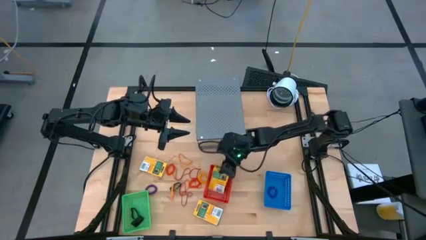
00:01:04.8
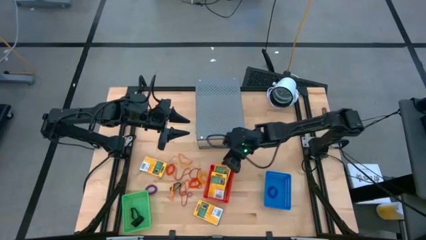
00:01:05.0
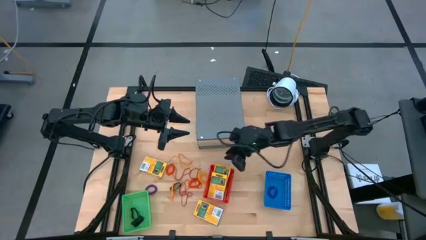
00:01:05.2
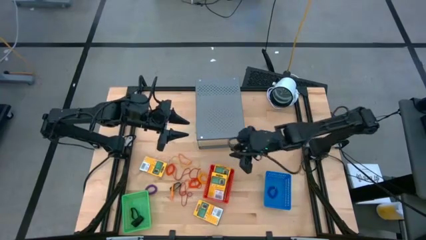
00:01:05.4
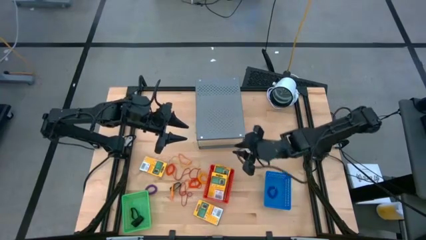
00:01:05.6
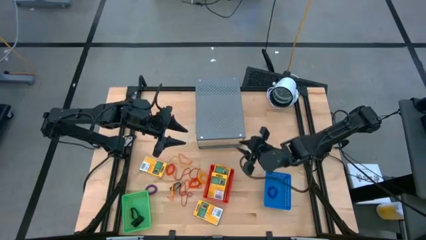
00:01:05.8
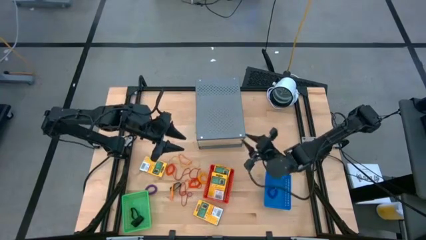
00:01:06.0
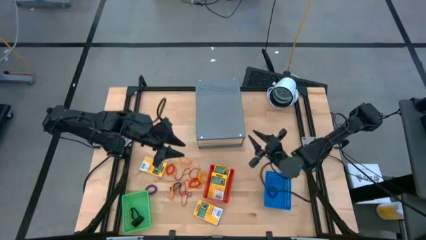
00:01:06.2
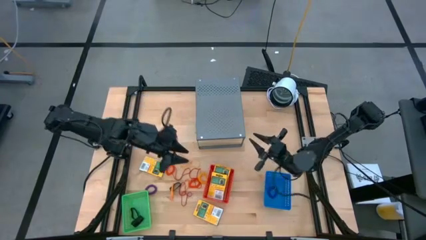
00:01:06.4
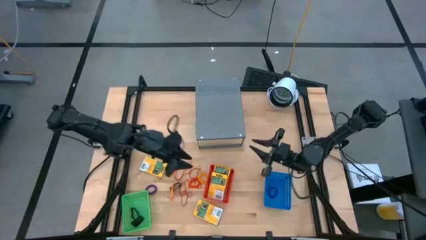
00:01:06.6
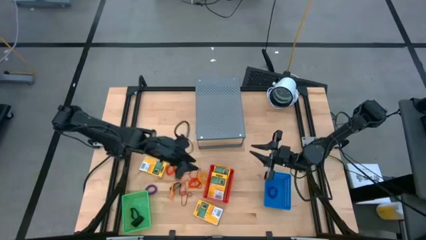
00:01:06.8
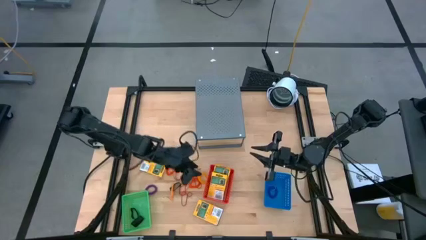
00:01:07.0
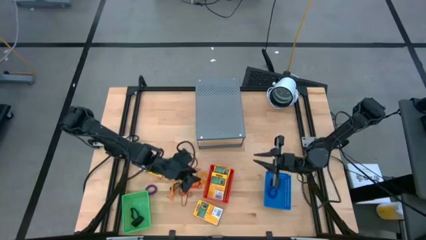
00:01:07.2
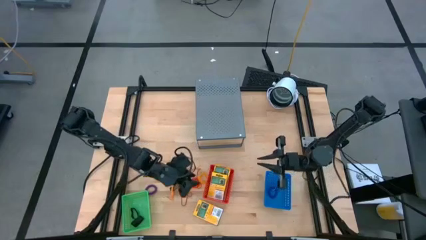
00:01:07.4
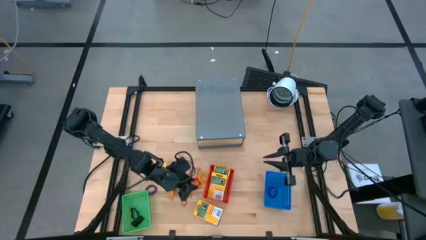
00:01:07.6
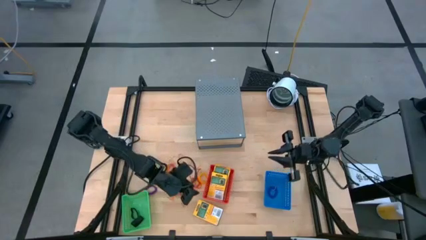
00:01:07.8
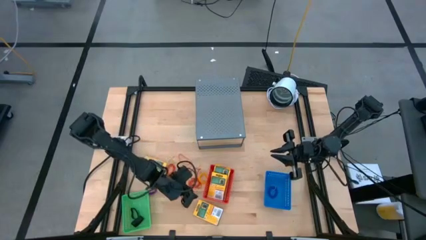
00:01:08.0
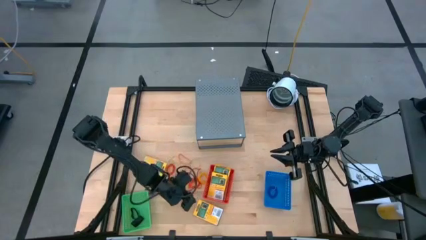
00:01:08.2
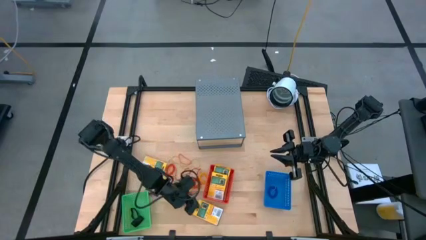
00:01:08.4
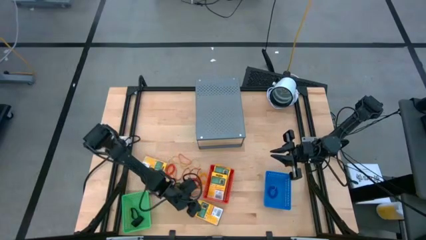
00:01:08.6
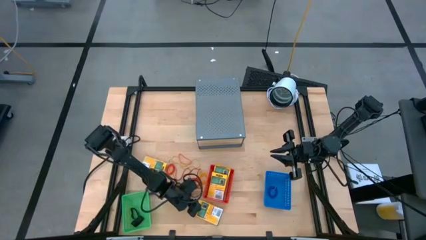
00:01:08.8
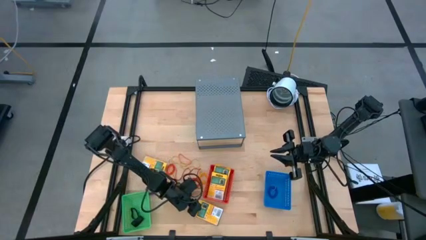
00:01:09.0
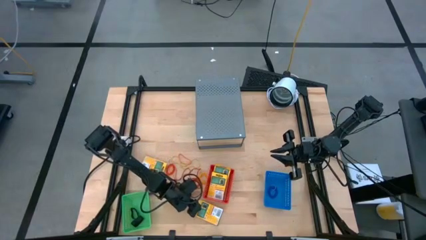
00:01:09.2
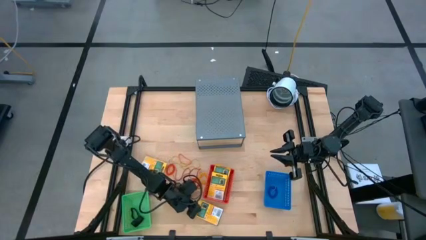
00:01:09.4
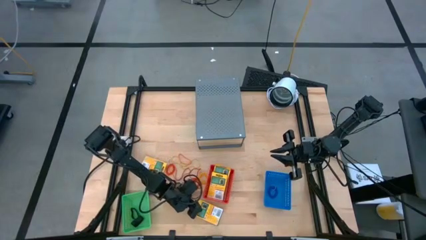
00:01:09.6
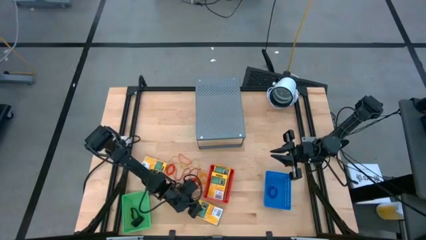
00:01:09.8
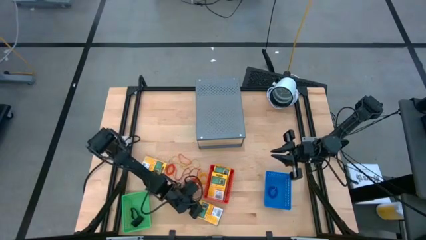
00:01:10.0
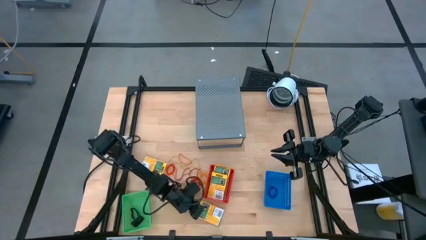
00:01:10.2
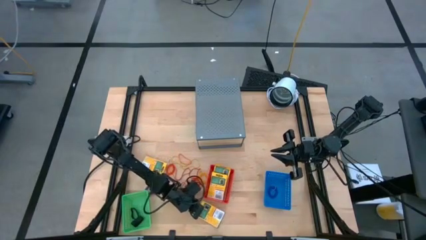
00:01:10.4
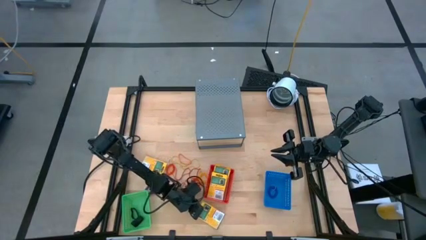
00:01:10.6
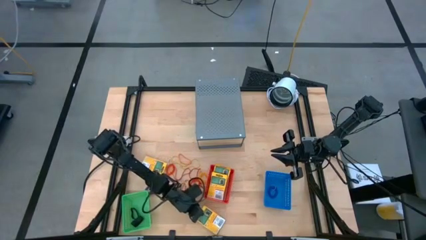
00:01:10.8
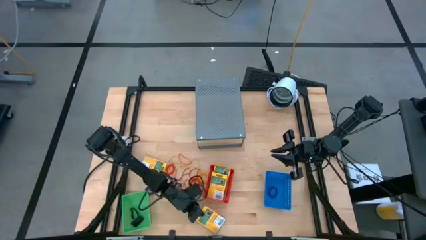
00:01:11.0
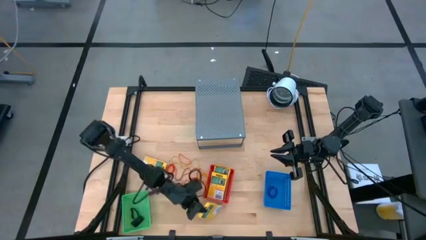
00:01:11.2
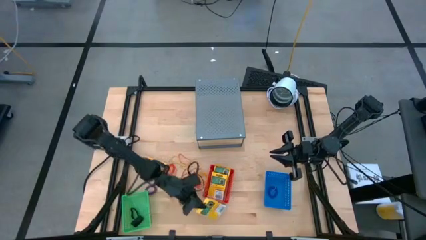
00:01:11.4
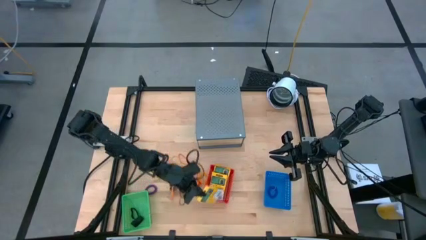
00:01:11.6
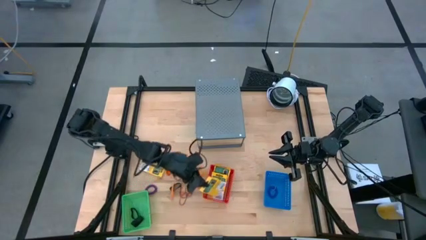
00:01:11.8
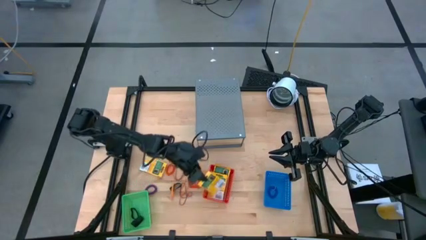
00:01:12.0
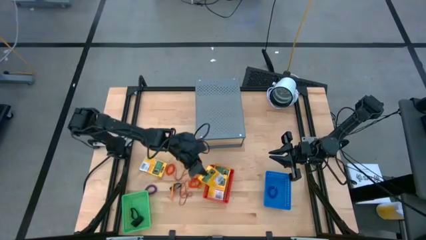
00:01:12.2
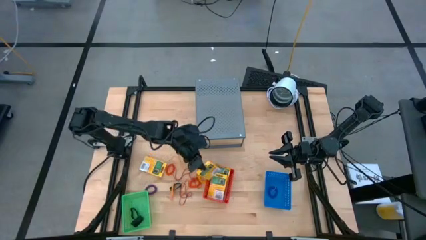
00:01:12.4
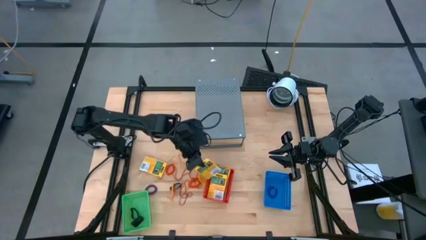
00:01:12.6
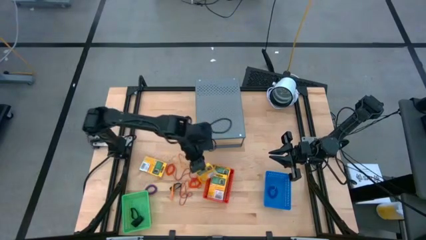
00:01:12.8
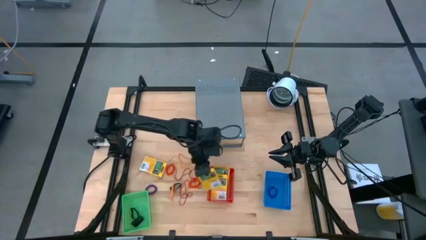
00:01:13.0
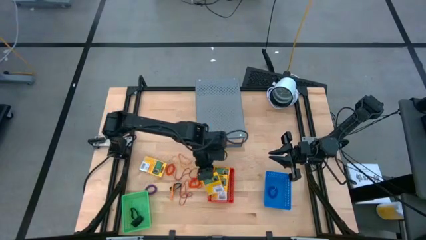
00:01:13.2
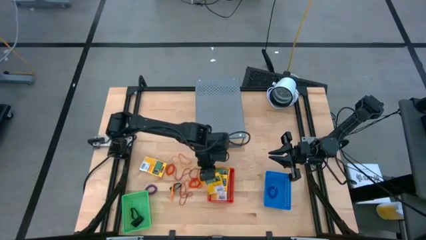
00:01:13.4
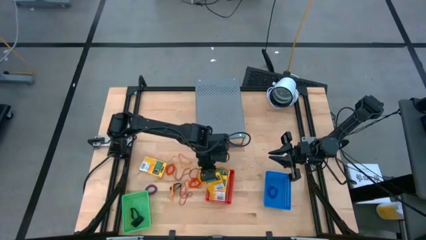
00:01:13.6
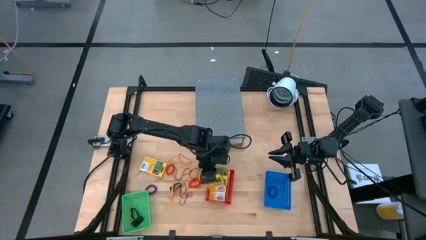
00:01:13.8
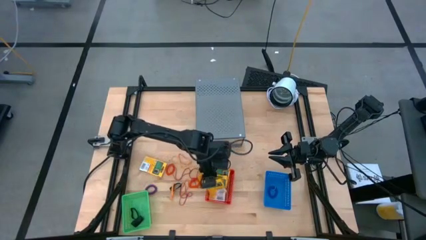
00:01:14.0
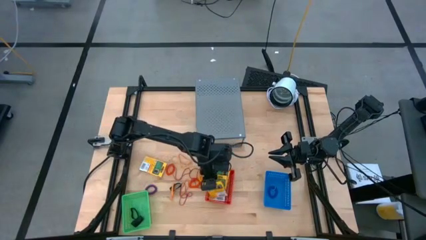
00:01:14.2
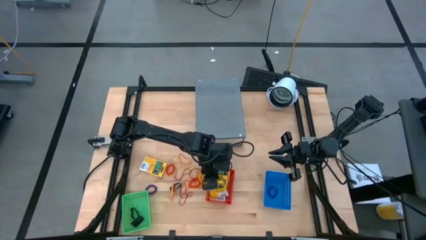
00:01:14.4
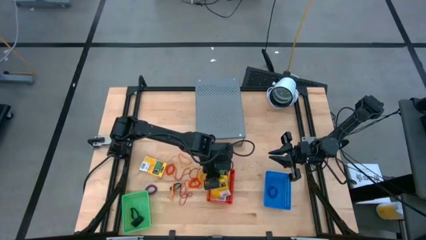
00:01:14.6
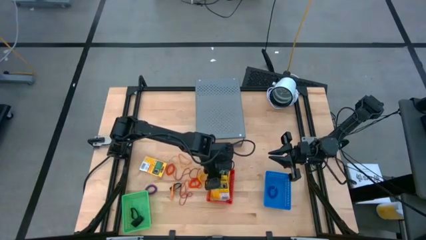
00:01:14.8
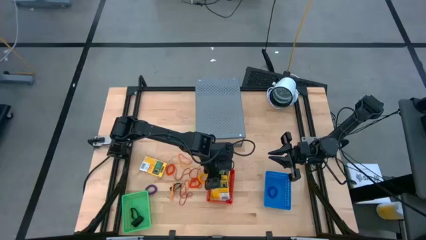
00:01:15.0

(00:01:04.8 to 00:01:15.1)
Task: Pick & Place Office Desk Supplies
Put the yellow crayon box into the red bin

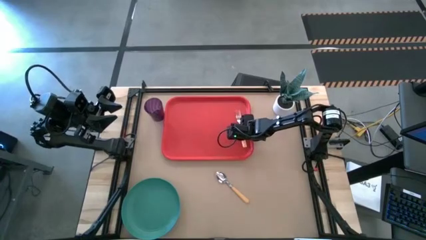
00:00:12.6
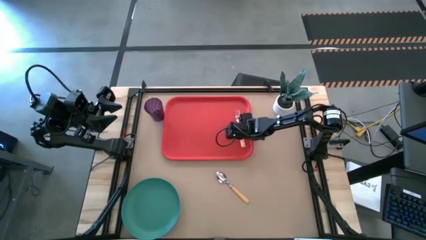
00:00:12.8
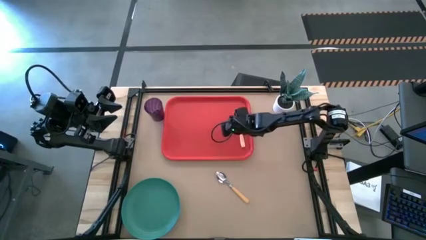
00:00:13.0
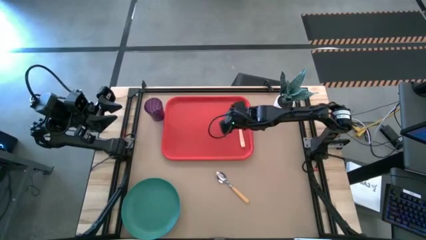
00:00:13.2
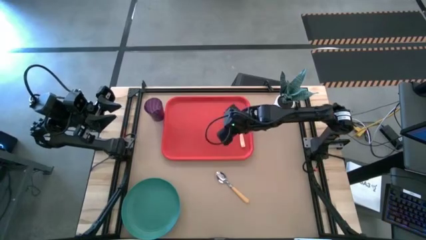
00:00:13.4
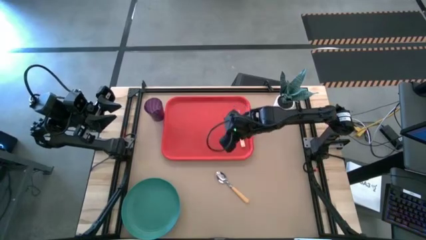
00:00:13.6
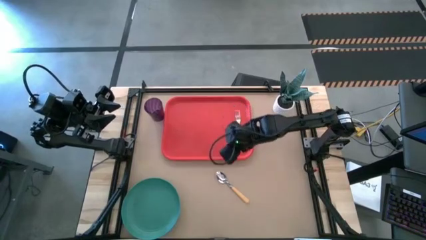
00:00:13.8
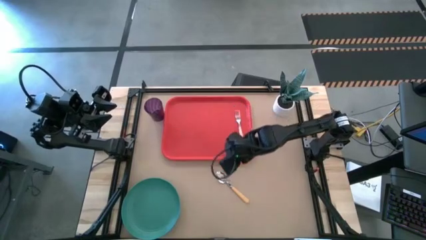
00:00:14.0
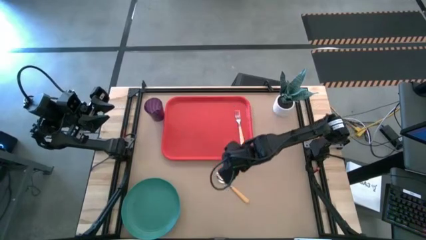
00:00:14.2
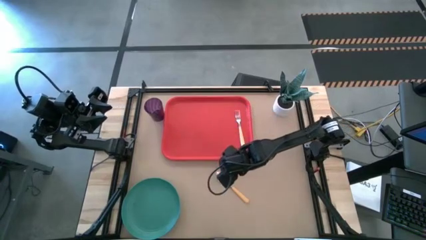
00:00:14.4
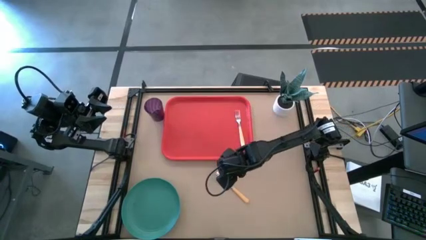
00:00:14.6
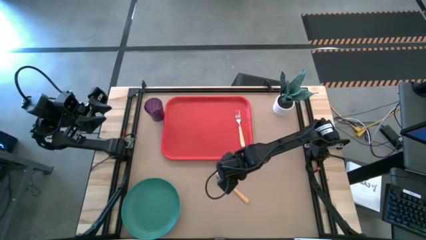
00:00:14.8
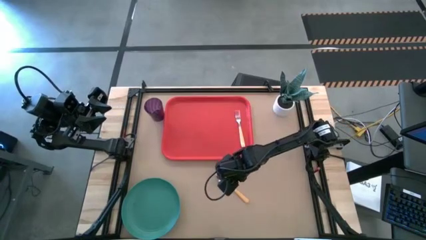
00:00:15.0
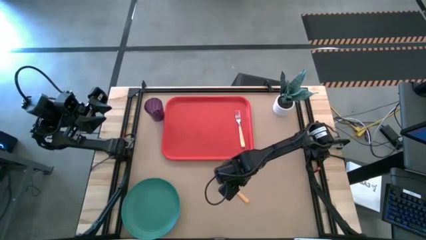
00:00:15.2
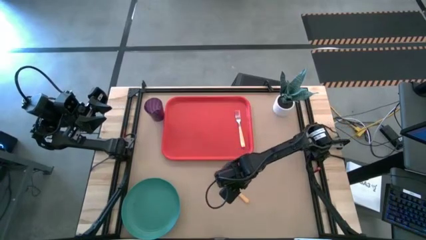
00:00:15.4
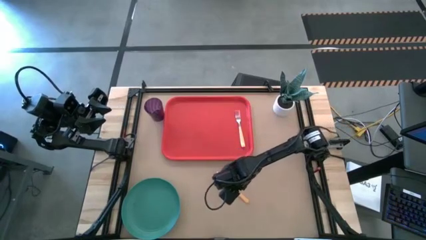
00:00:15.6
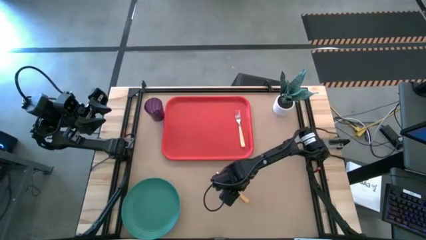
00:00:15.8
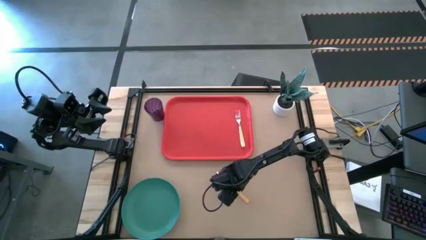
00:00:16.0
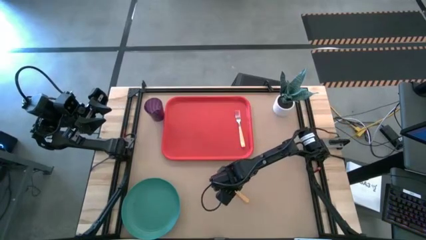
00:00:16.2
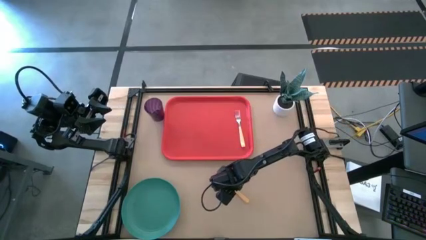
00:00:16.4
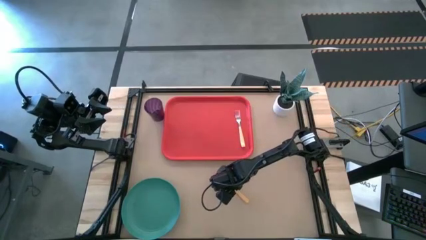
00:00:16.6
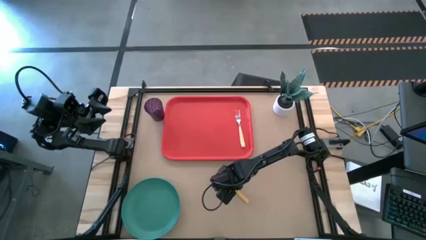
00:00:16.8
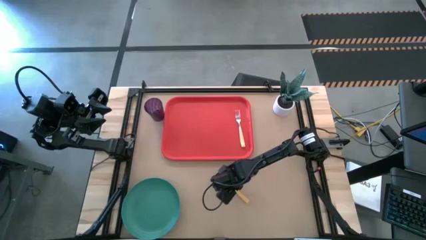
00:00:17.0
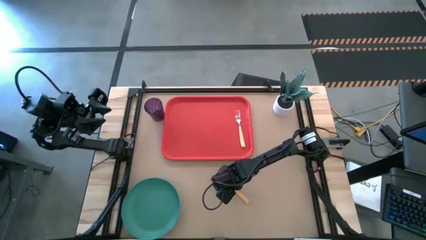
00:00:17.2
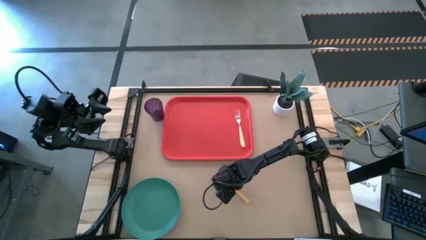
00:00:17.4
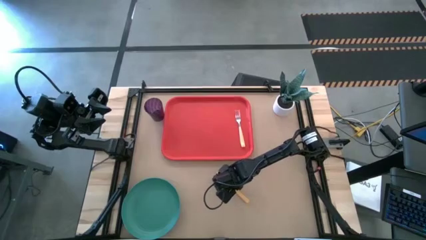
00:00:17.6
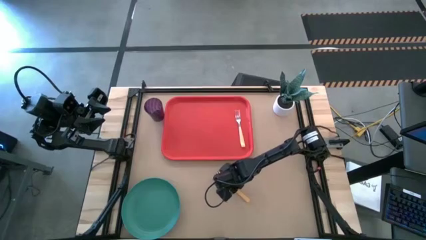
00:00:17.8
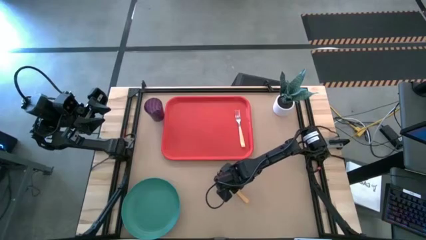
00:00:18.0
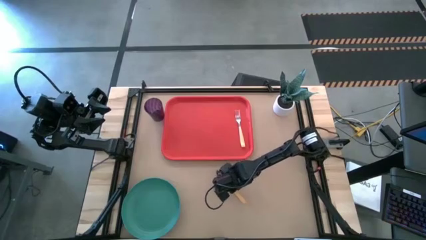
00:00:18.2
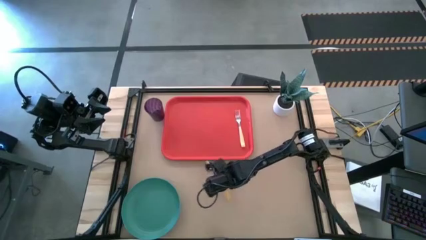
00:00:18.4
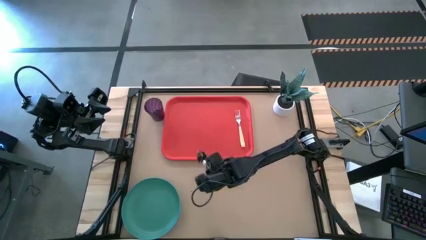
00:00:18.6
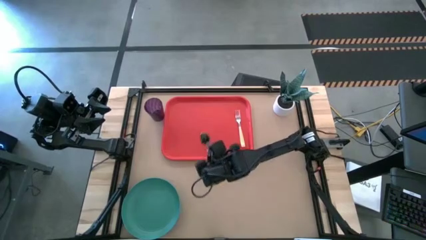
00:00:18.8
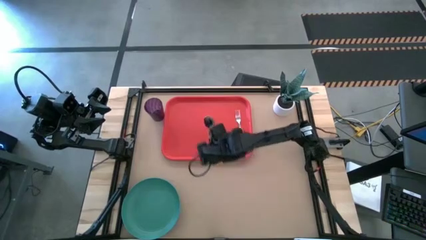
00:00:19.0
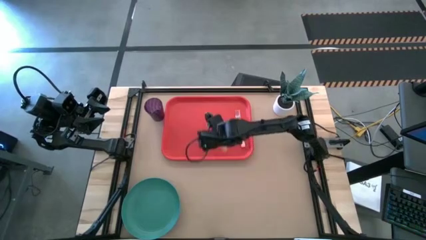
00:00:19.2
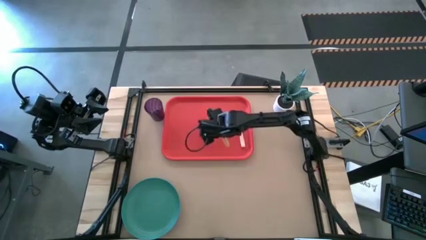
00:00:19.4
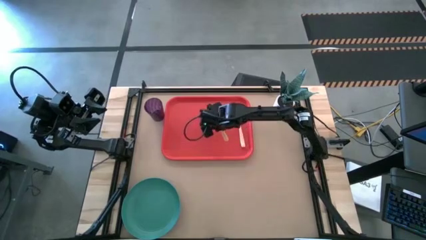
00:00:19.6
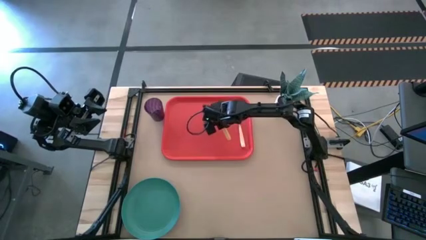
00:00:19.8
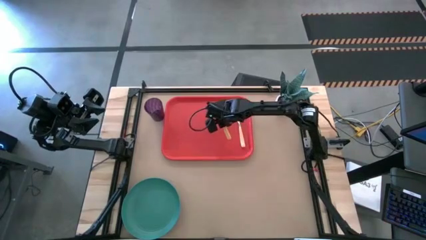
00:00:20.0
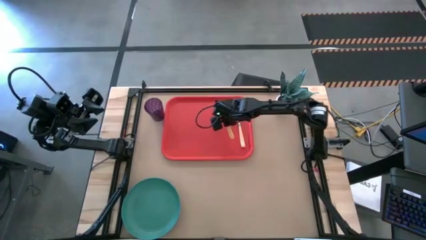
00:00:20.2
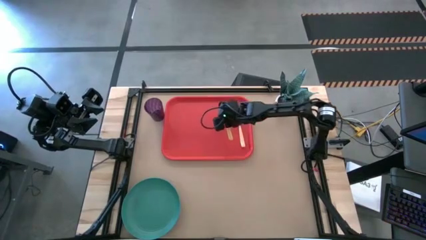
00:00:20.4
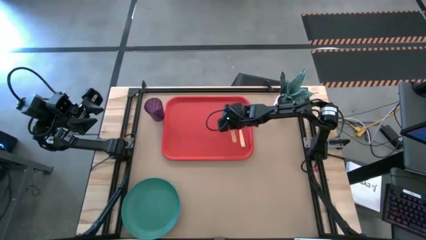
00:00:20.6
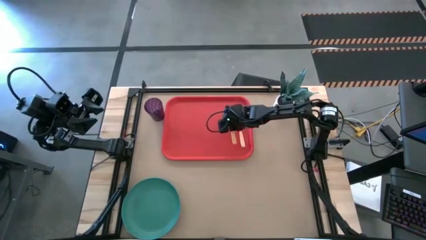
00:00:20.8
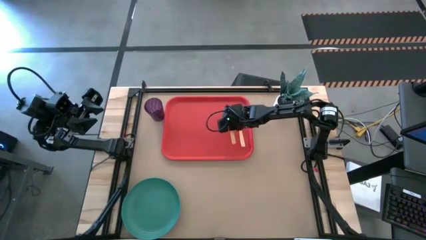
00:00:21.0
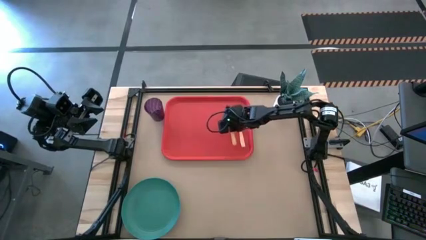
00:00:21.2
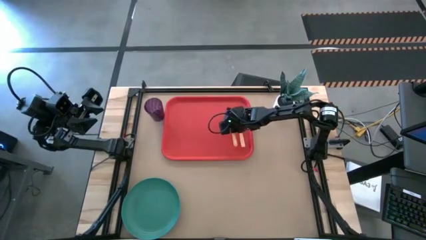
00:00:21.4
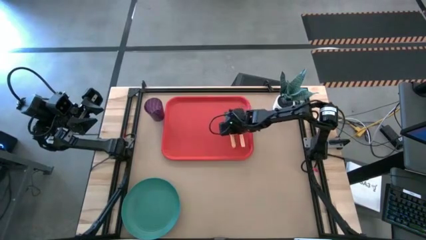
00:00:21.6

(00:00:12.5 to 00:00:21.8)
Task: Pick and place plate/cup/fork/spoon on tray
Put the orange spoon on the red tray to the left of the orange fork
